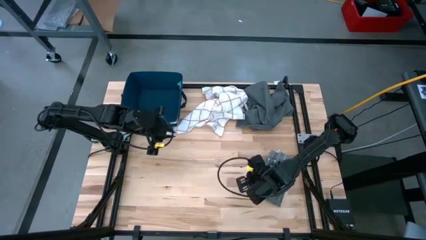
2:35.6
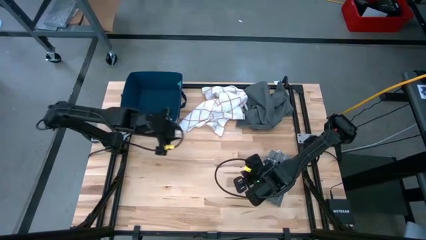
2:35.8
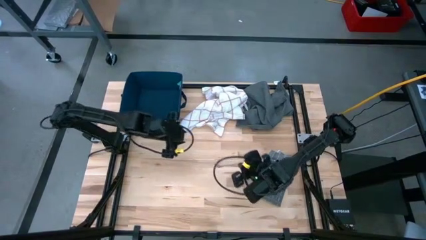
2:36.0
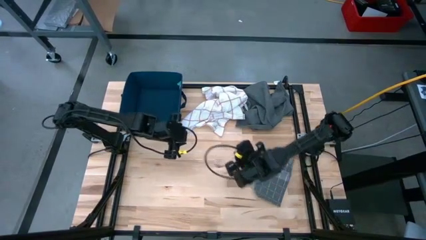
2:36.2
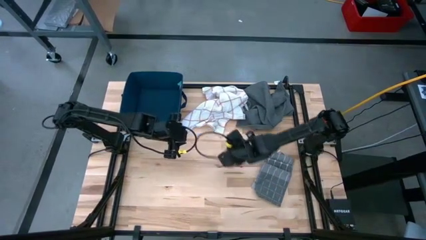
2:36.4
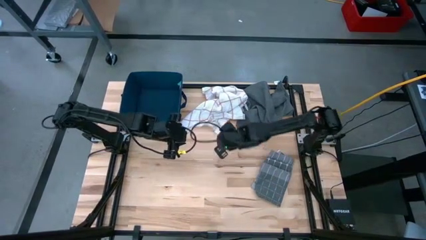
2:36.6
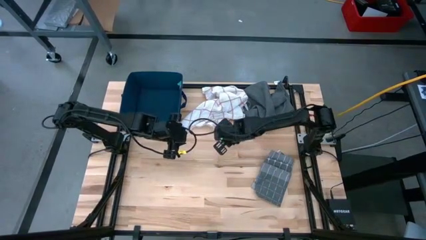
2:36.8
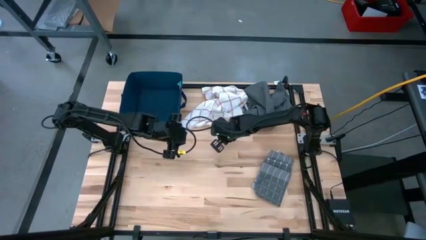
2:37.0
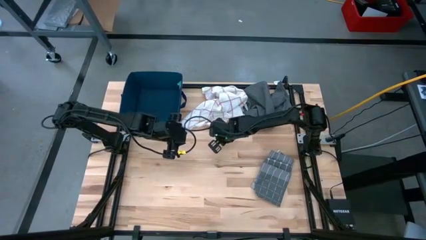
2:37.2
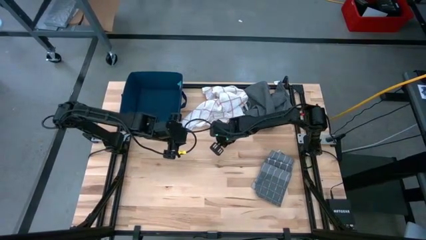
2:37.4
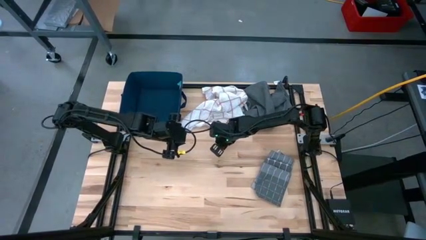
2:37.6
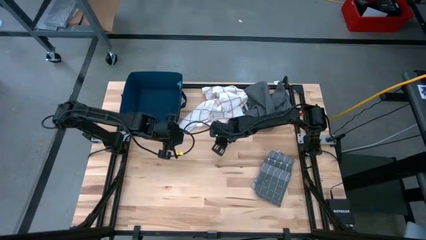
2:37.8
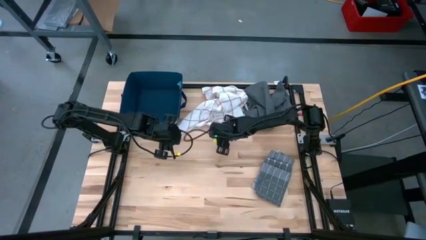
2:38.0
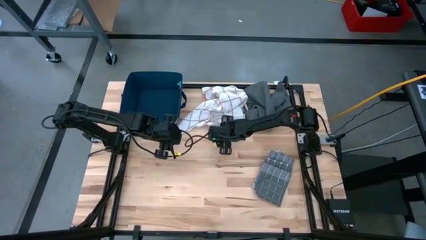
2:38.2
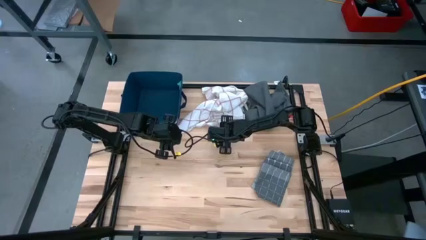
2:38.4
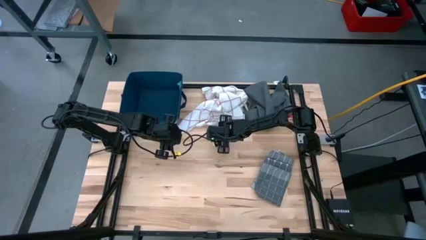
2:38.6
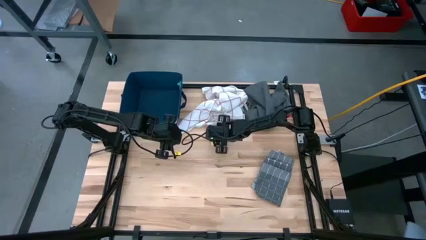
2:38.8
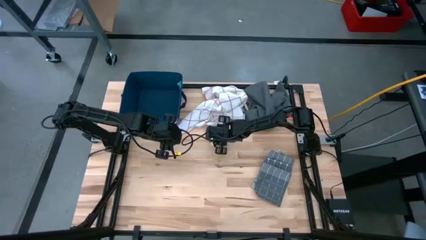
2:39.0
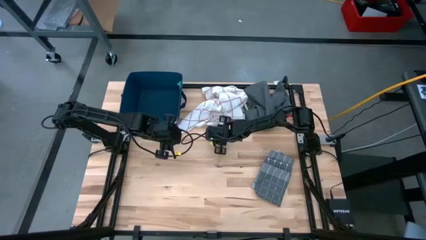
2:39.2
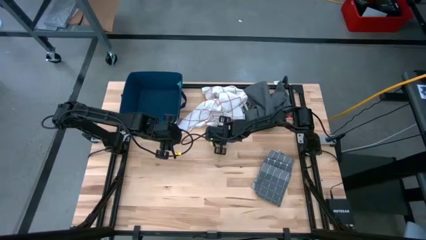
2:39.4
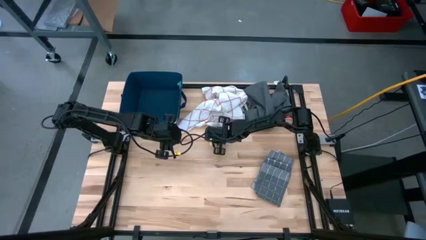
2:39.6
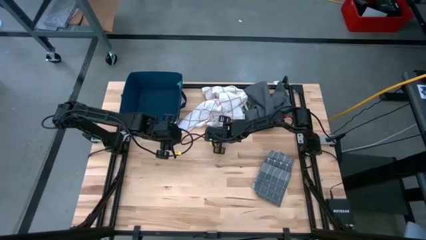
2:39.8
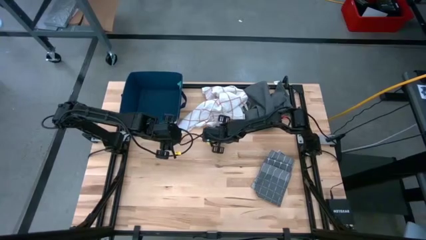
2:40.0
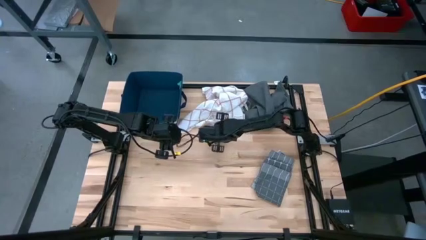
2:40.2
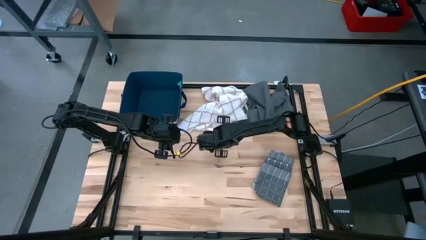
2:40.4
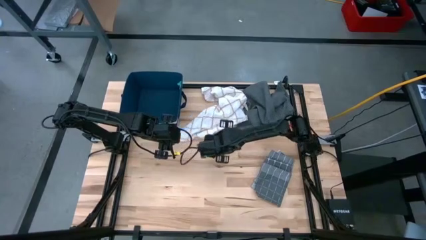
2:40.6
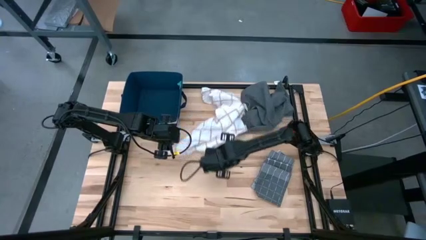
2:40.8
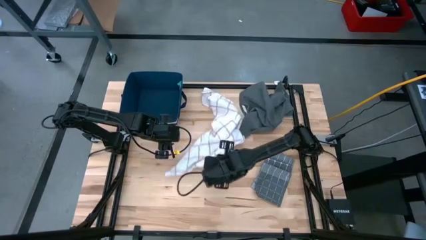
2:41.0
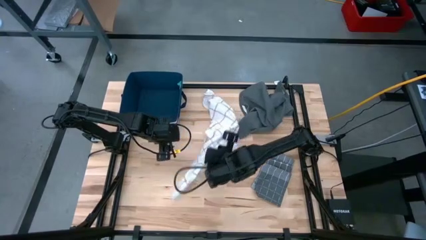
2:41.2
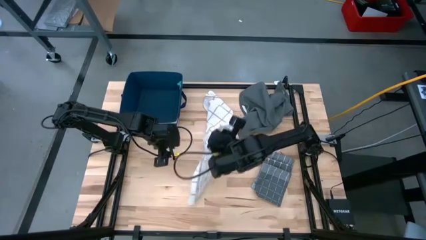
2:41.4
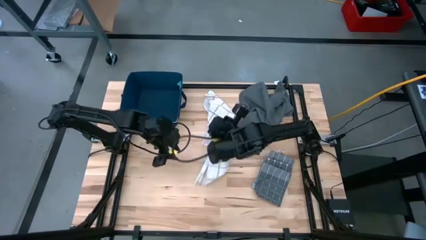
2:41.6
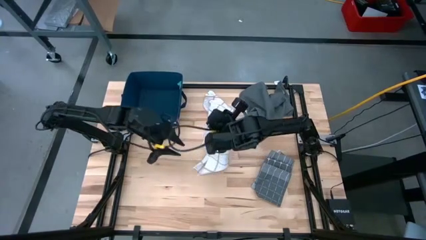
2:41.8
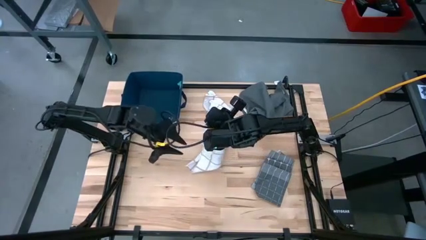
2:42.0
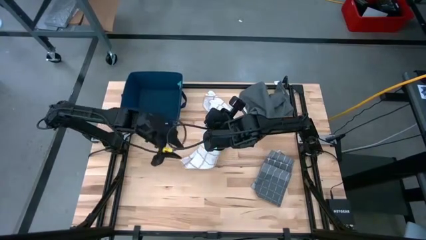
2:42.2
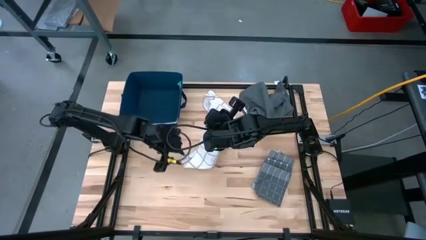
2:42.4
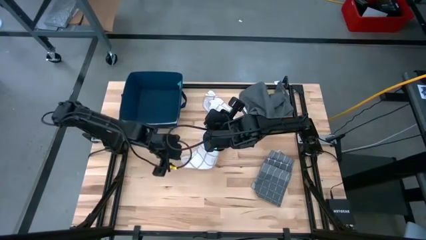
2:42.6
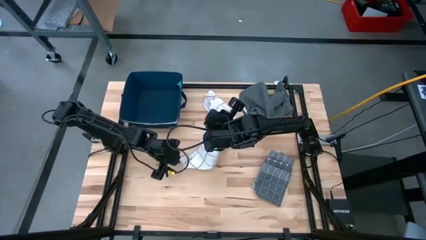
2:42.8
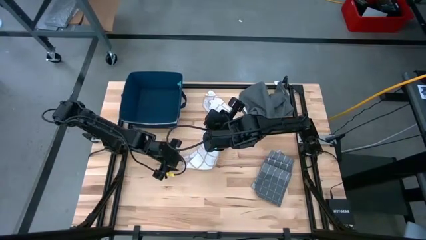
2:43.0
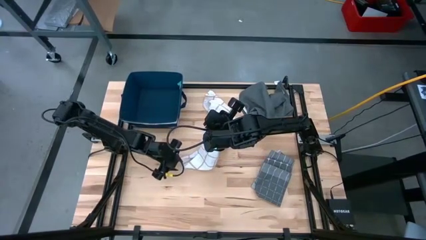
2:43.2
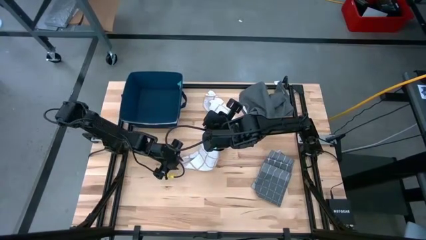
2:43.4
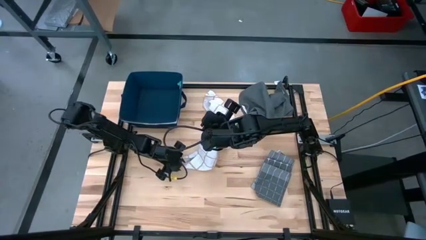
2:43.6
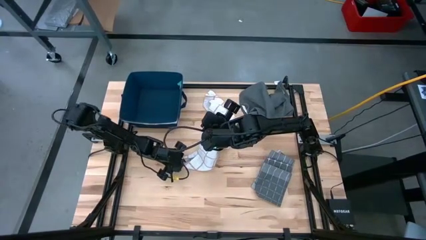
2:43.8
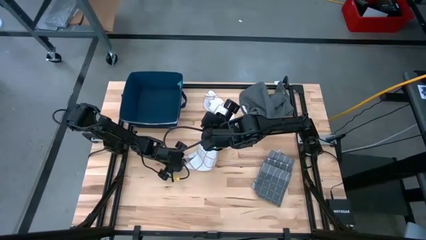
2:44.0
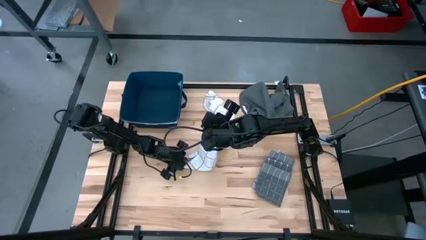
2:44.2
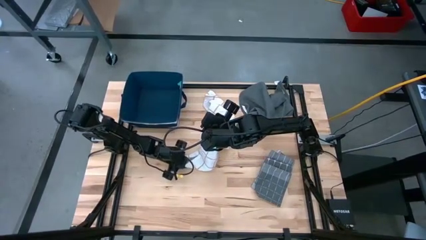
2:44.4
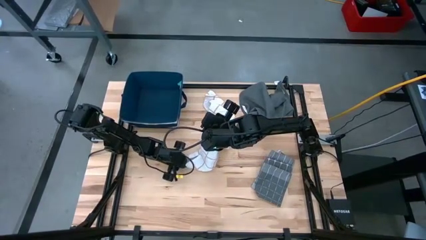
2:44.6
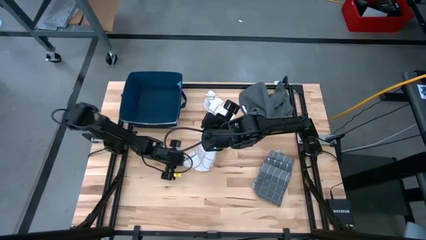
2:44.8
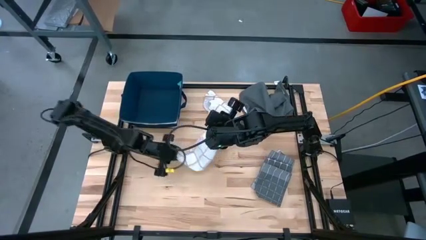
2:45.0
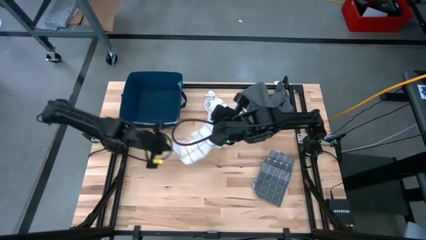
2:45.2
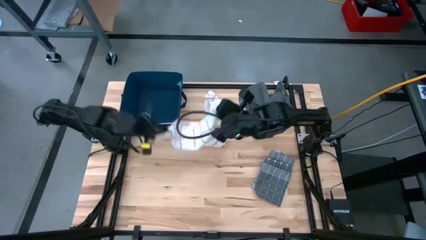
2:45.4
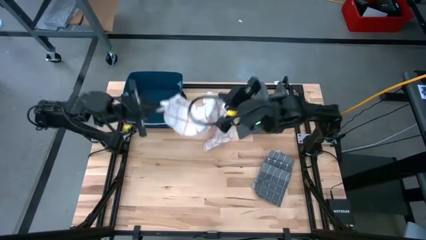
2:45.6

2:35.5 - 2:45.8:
Task: Fold towel
Fold the white towel

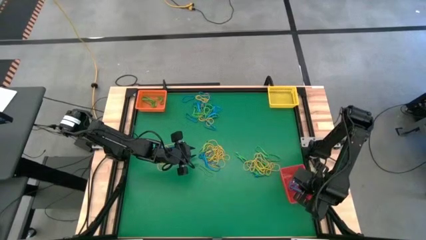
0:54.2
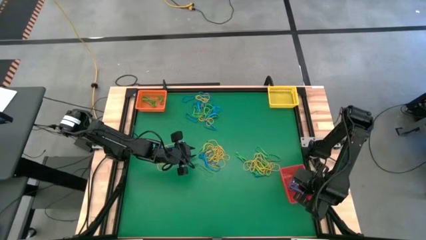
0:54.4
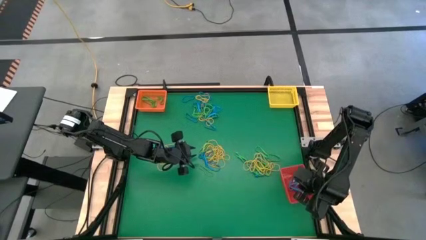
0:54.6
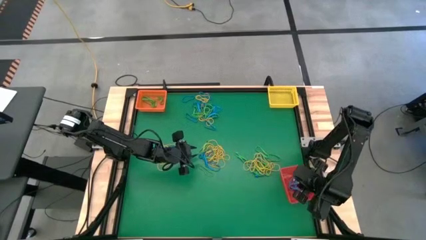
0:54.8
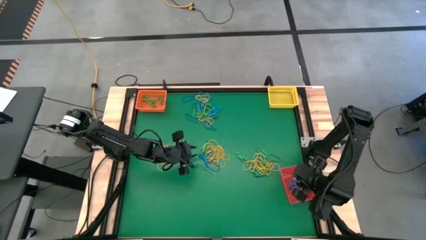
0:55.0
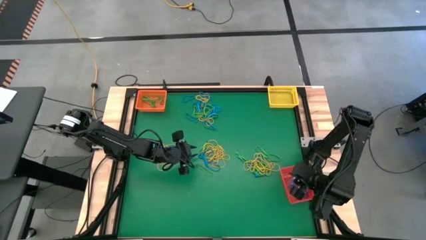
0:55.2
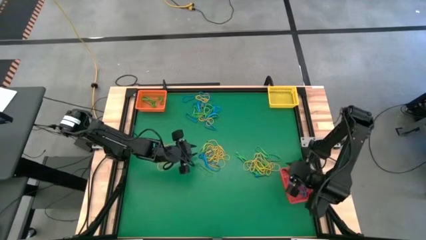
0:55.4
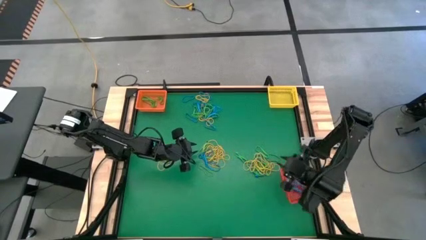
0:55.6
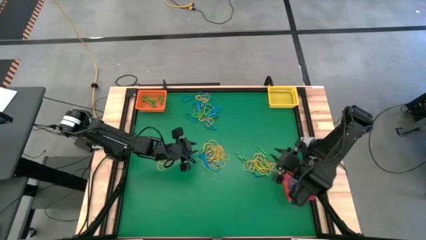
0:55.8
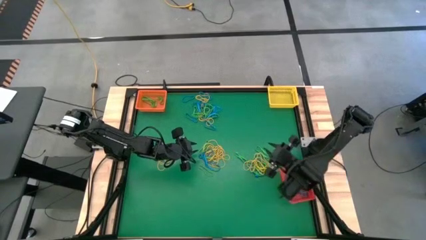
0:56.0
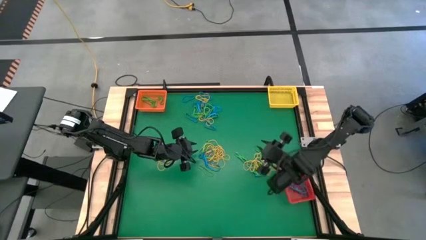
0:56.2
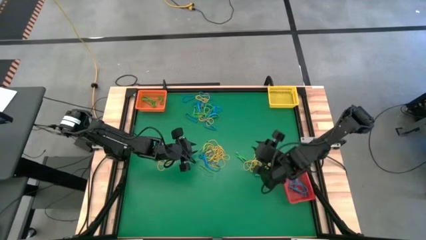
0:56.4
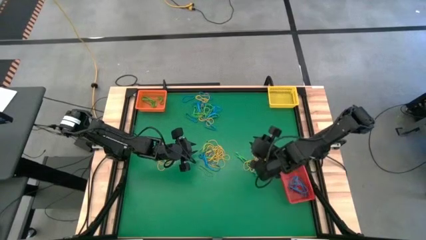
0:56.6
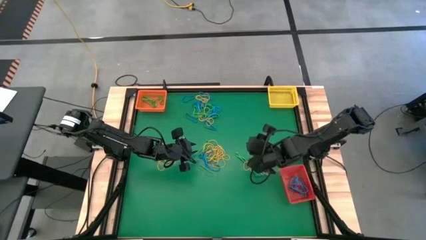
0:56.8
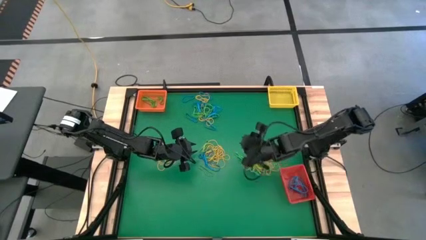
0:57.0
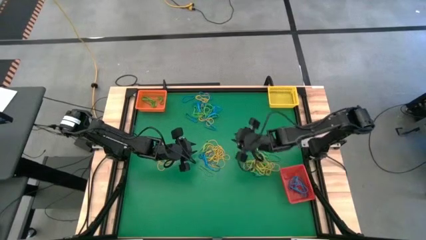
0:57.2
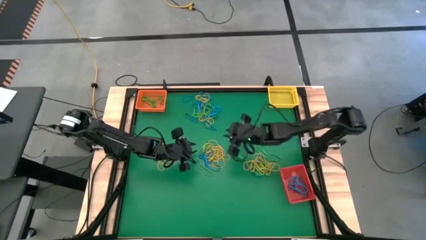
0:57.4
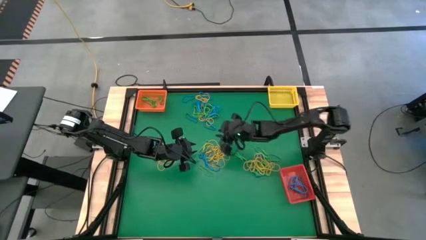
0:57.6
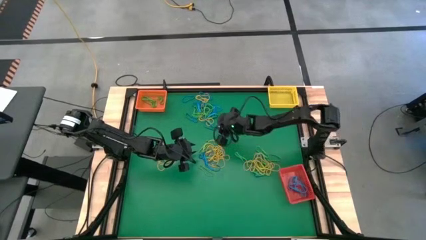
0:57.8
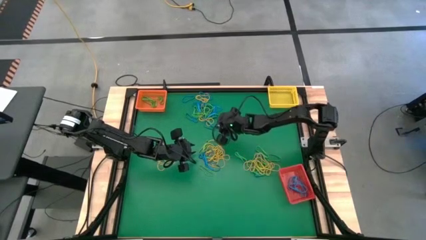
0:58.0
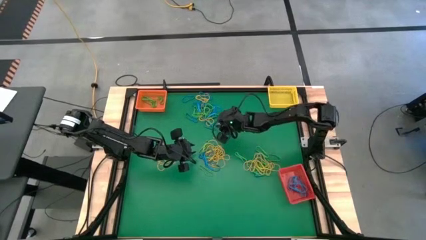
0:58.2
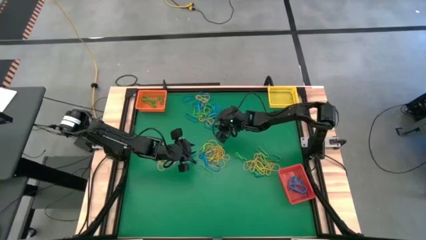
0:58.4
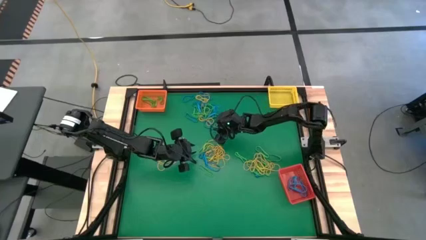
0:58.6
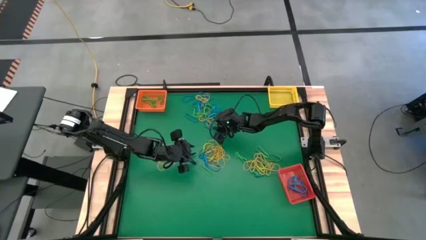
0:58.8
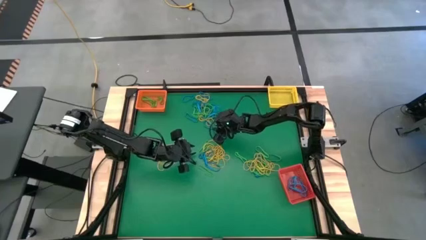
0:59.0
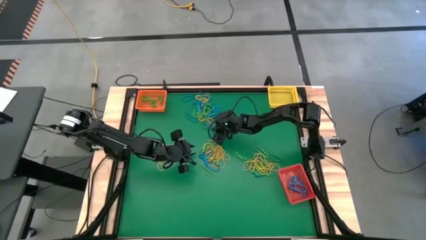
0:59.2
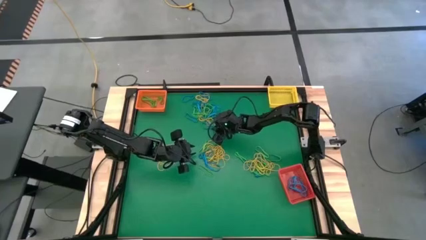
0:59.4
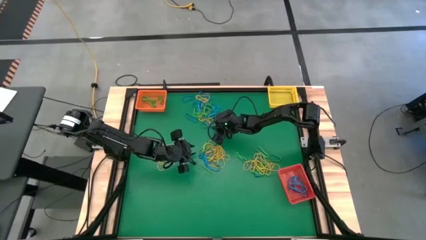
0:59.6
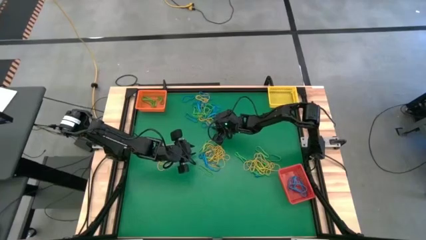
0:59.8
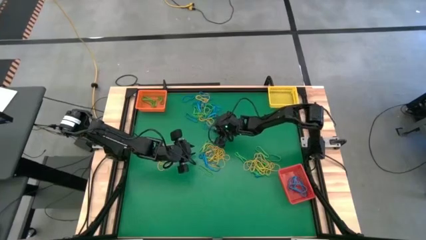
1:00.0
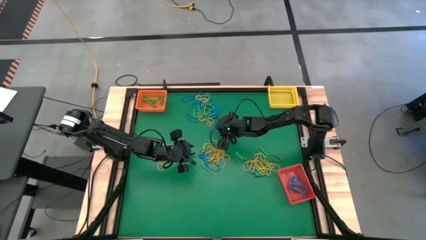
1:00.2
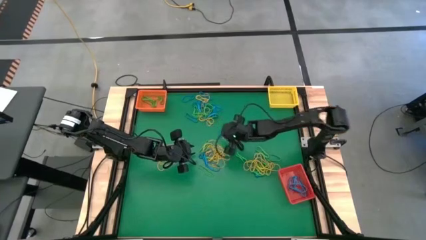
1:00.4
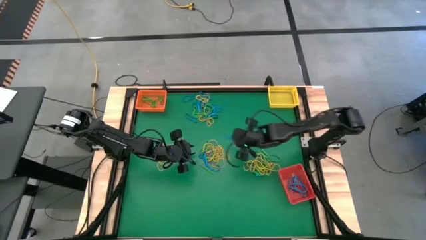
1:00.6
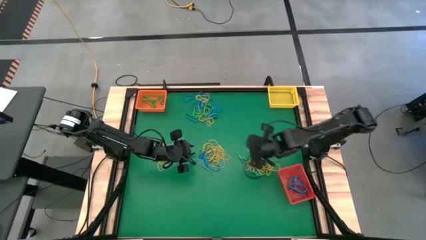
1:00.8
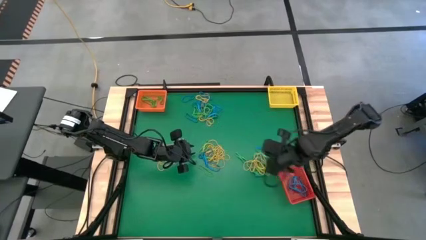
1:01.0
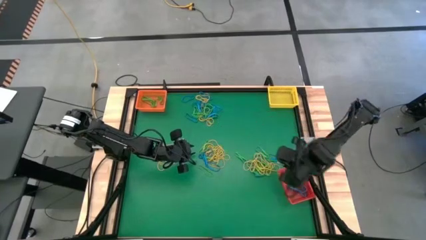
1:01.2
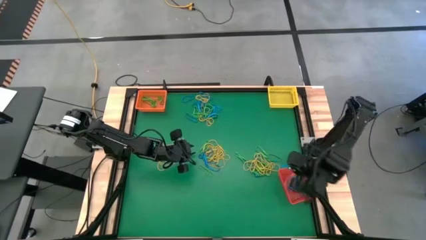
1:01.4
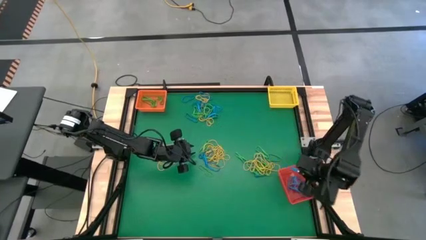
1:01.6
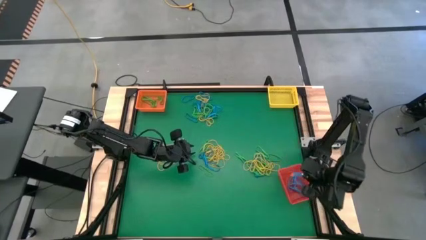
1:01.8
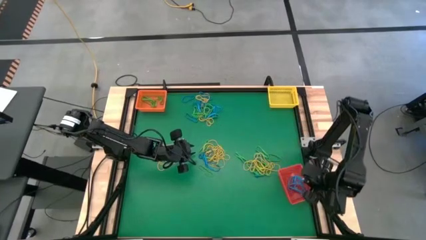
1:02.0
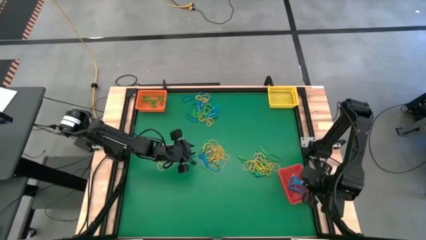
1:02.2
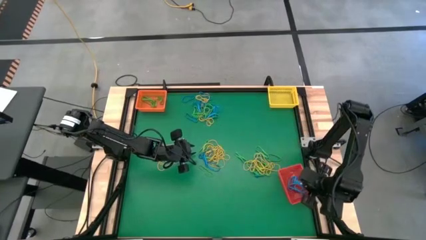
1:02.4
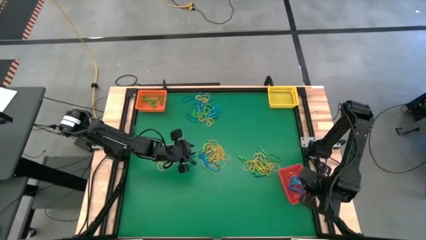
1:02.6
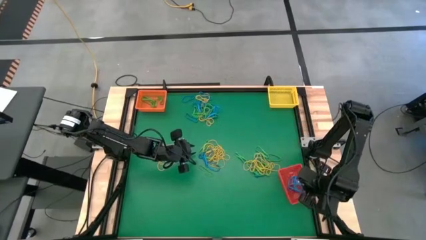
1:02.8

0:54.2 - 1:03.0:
Task: Sort rubber bands into baskets
Put the blue rubber band into the red bin
